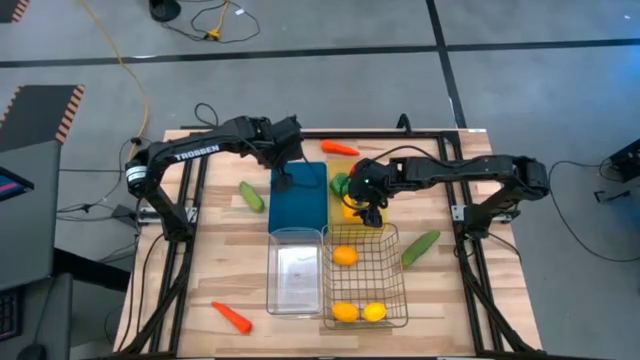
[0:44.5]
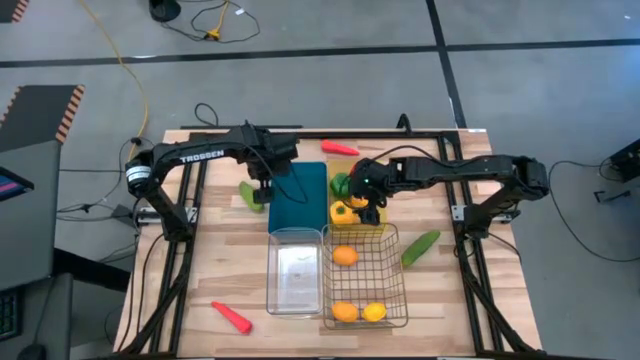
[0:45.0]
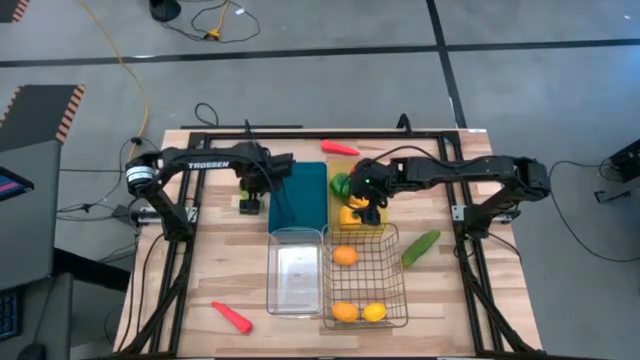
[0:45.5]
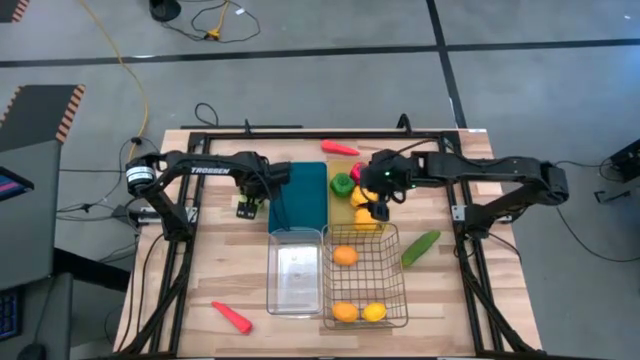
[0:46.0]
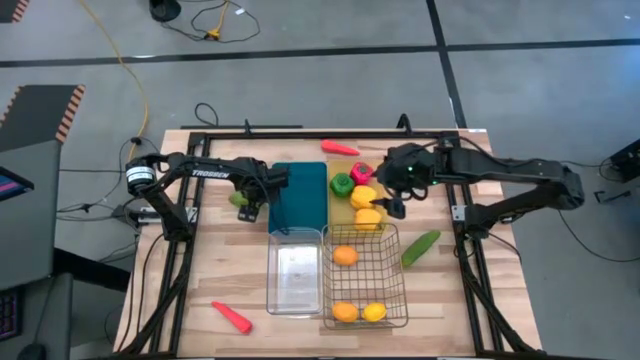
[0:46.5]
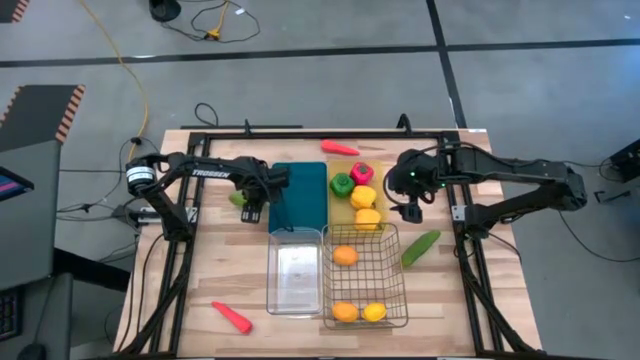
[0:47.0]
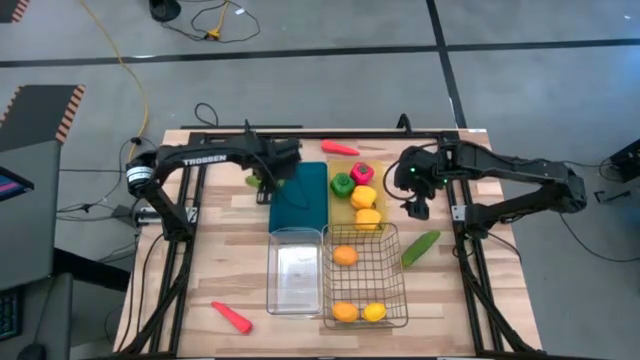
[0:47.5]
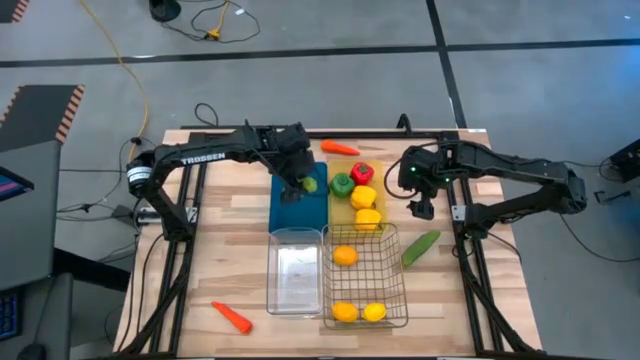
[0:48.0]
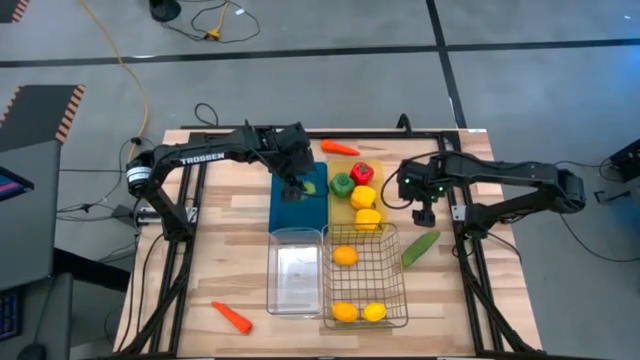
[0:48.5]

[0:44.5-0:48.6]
Task: Sort produce into baskets
Put the left cucumber into the blue bin

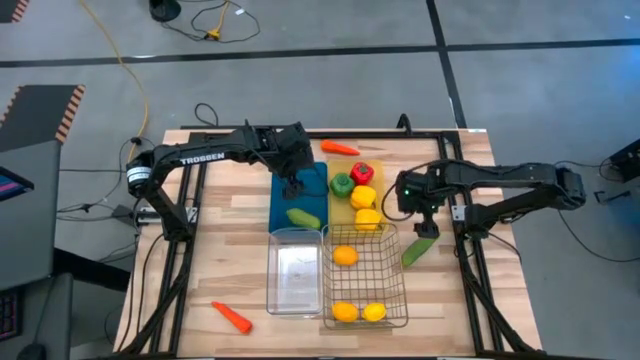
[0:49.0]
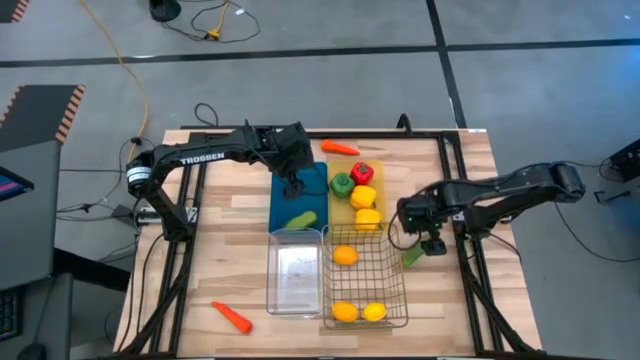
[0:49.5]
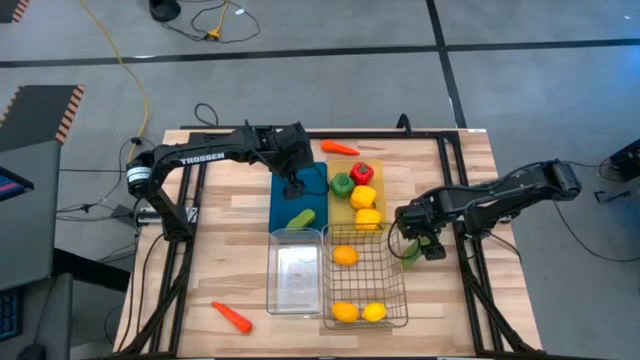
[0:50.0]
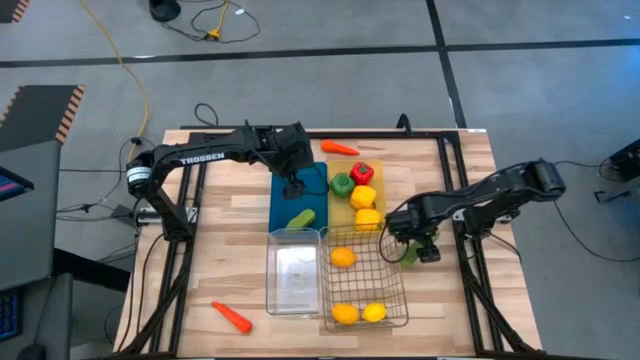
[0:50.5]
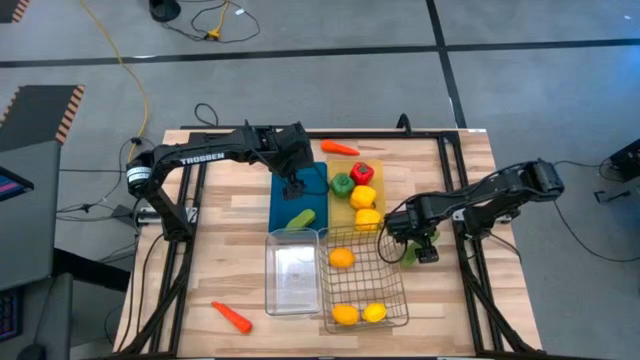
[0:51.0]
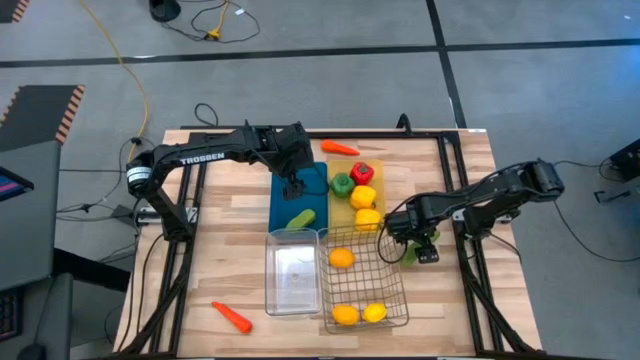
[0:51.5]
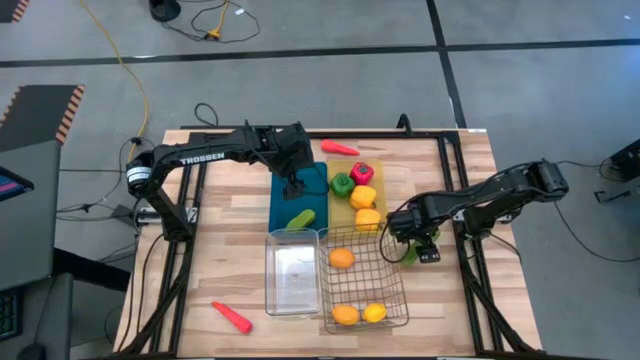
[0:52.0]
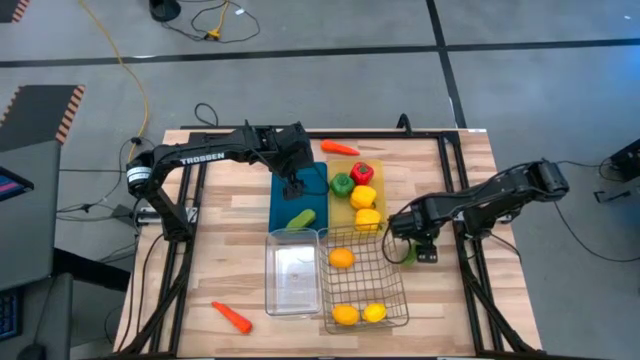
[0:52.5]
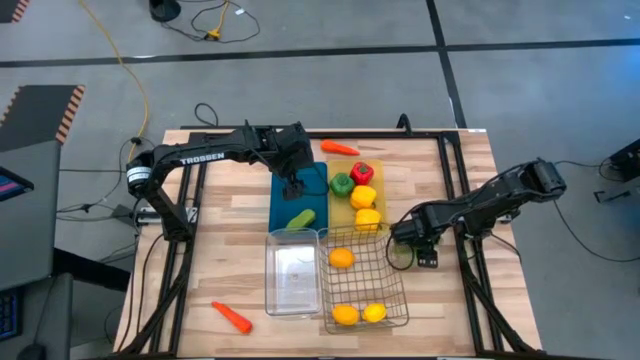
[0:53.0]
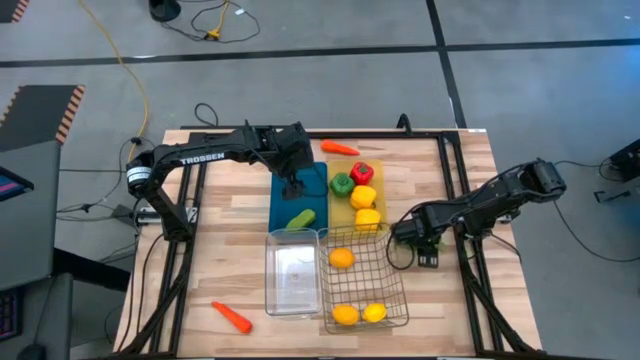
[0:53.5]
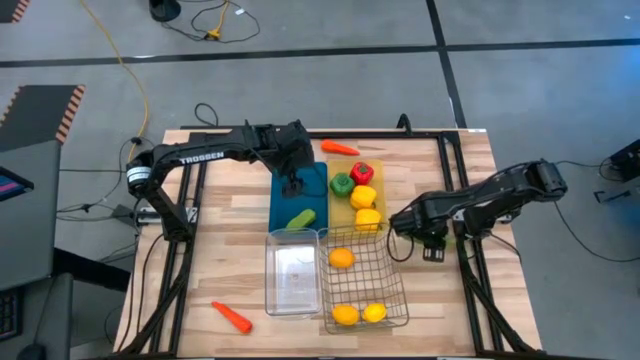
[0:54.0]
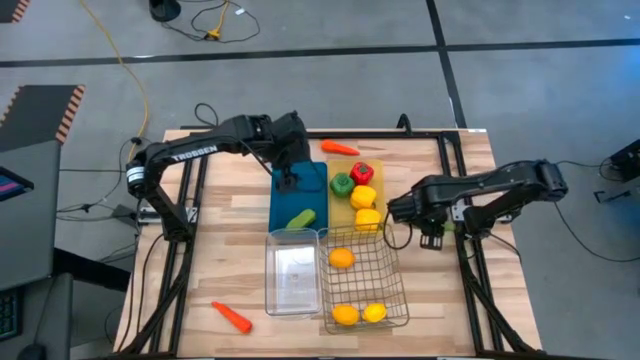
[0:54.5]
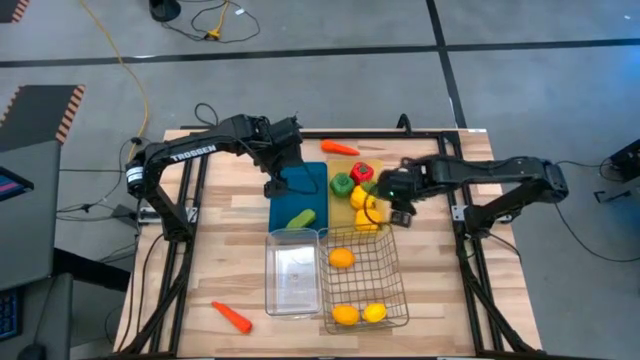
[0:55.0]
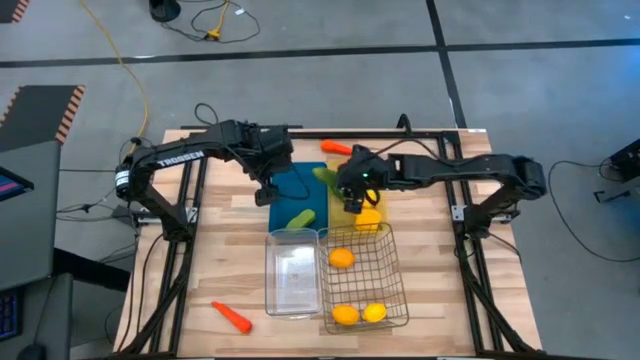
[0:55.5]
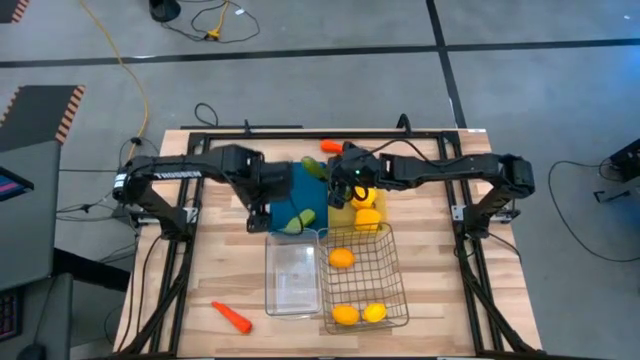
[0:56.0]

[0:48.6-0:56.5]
Put the cucumber into the blue bin

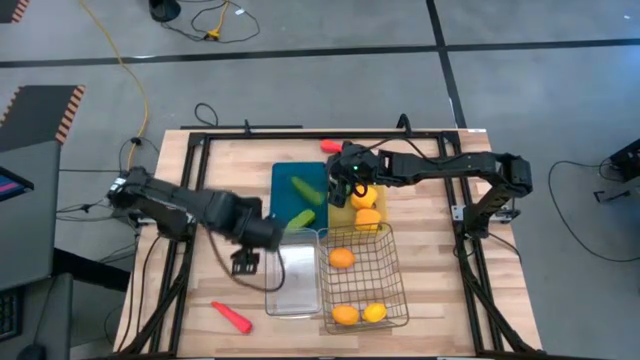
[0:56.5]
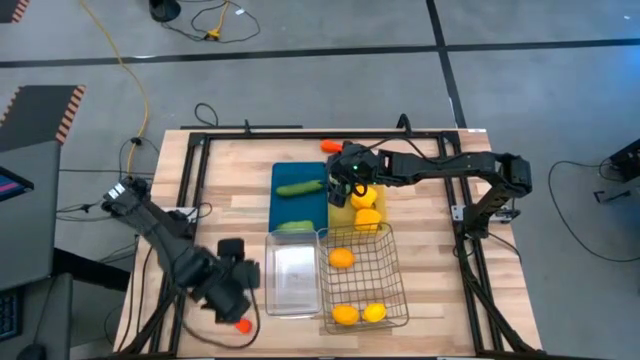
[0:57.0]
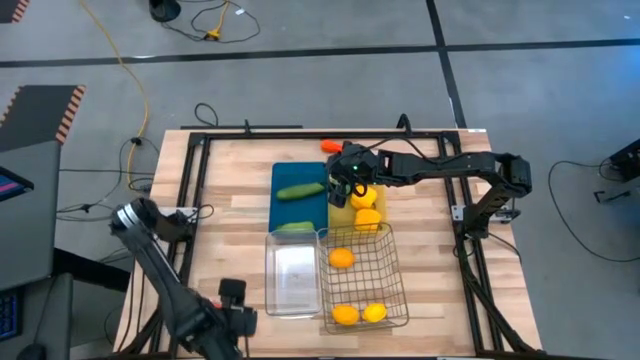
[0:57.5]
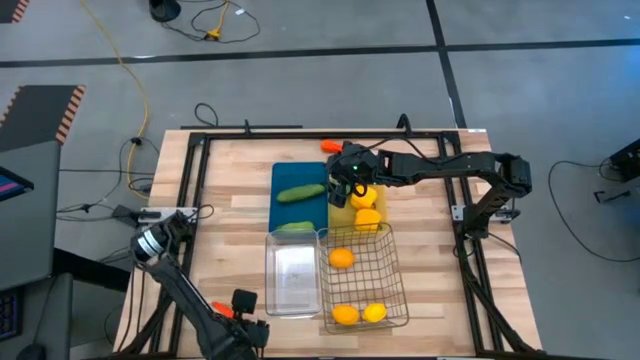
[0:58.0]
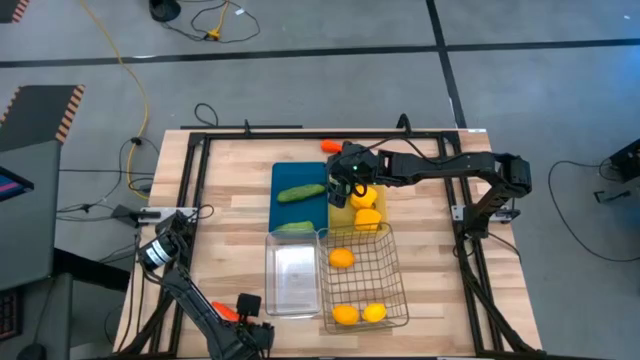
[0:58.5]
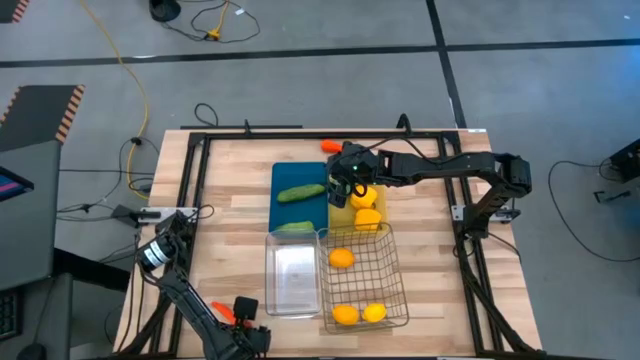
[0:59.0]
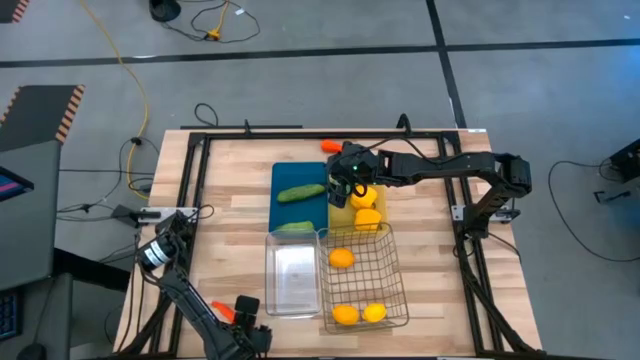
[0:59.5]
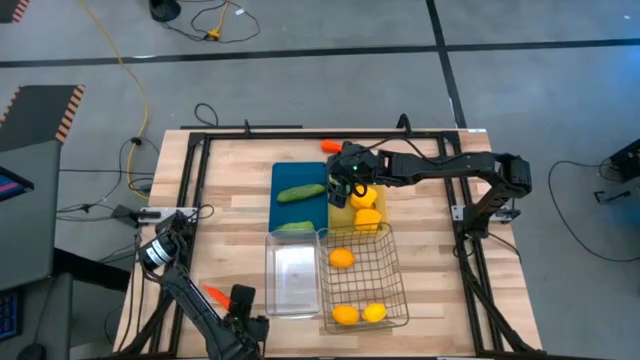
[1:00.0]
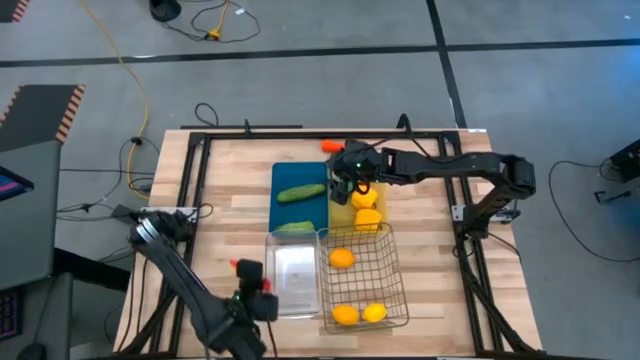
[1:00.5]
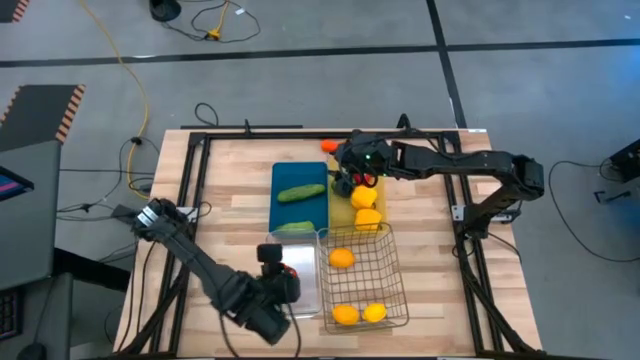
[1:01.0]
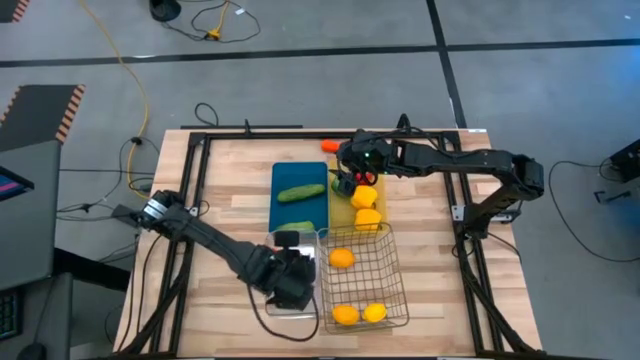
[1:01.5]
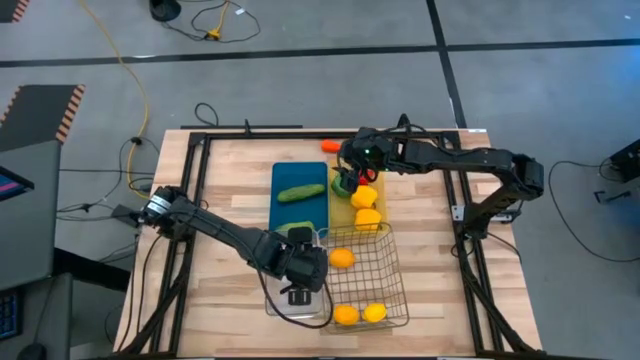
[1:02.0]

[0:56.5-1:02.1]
Put the bottom carrot into the transparent basket

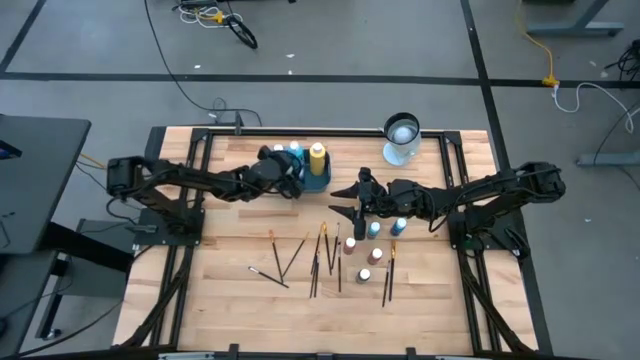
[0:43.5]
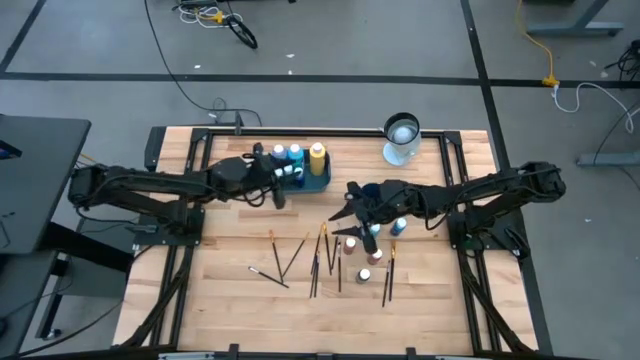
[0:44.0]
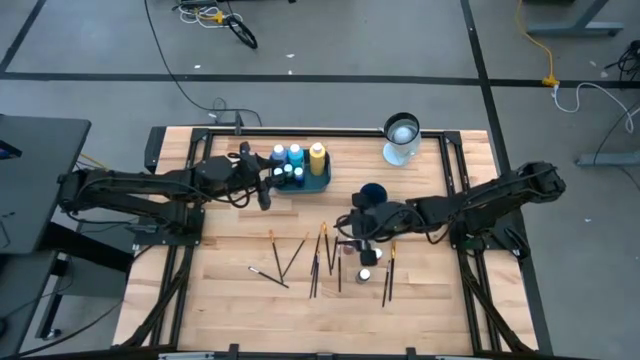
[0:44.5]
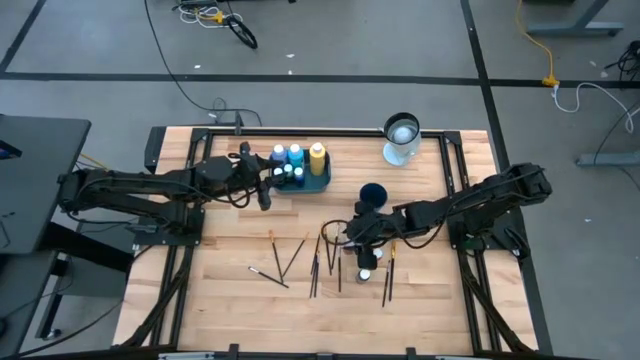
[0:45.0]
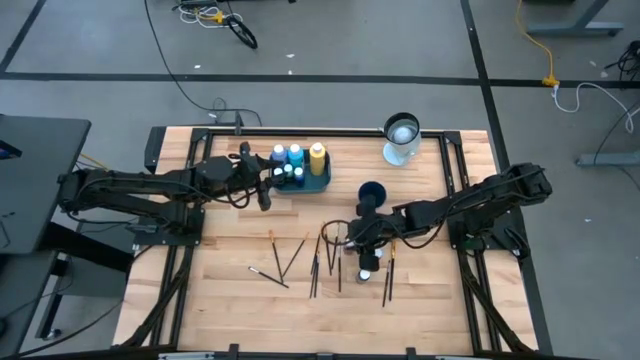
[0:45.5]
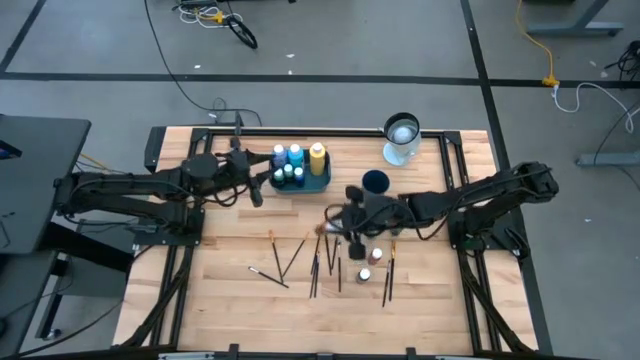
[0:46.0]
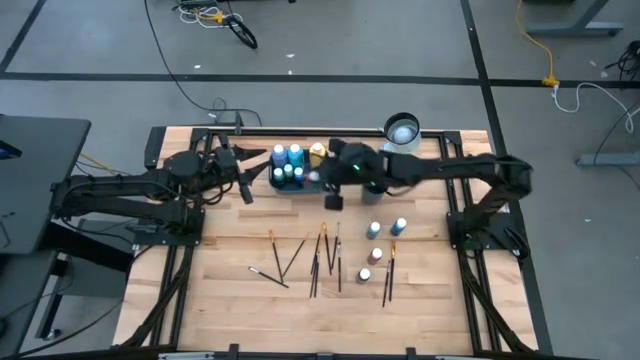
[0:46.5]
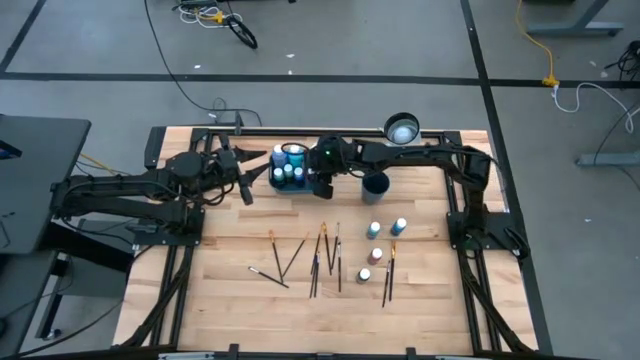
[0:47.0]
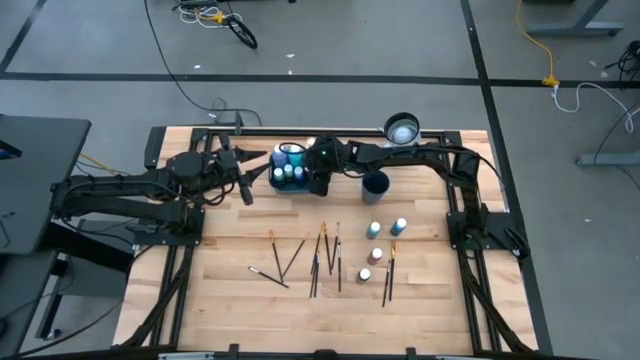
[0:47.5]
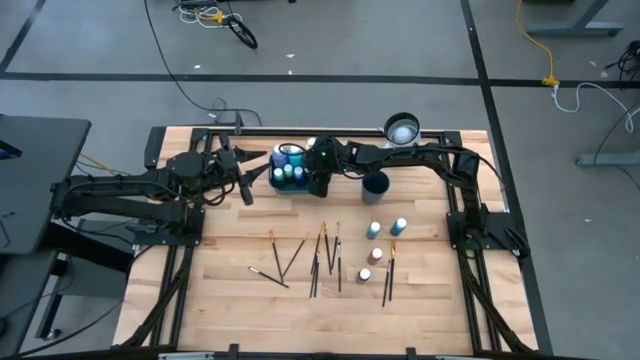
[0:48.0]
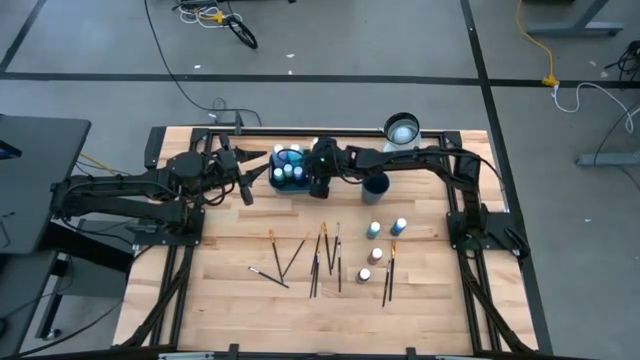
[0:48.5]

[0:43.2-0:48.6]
Task: Pick & Place Paint Supplies
Put the orange paint bottle into the blue bin
